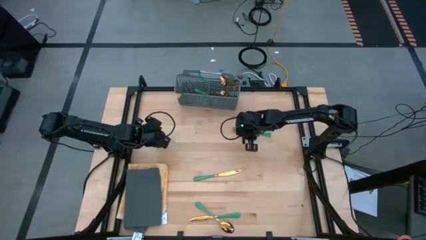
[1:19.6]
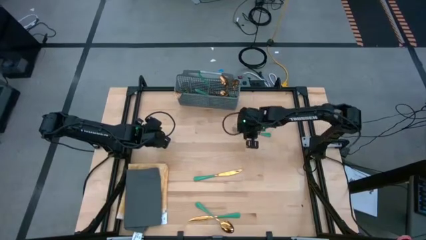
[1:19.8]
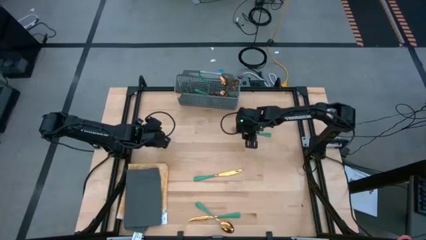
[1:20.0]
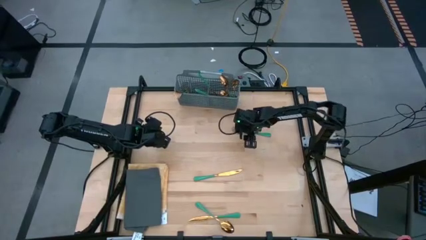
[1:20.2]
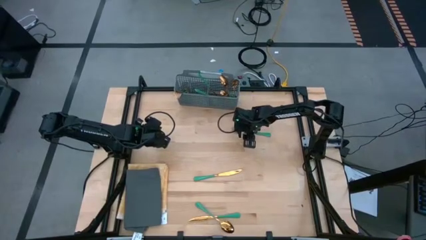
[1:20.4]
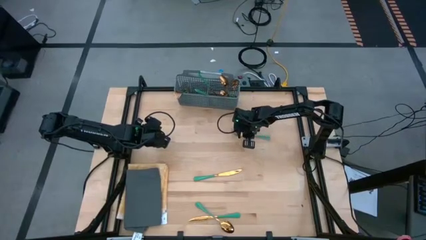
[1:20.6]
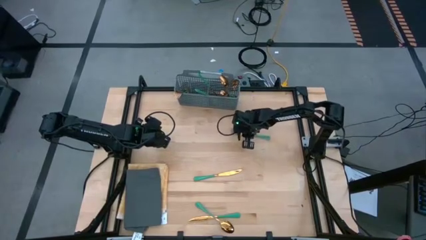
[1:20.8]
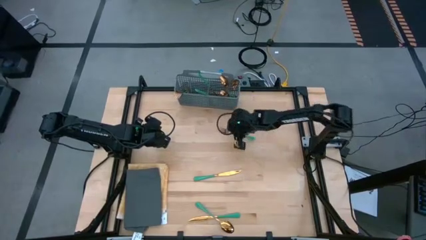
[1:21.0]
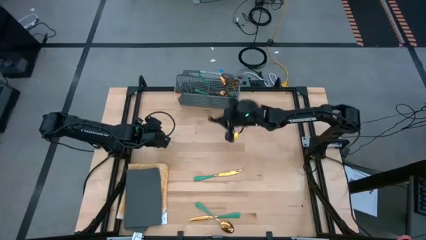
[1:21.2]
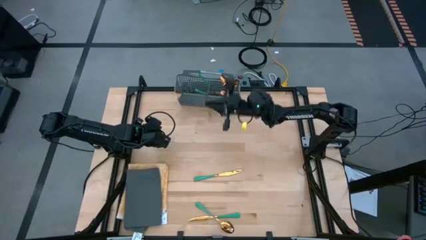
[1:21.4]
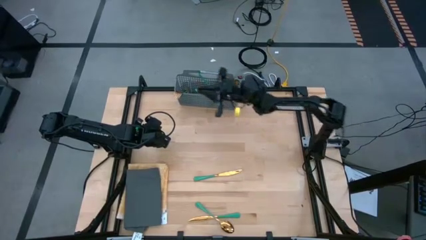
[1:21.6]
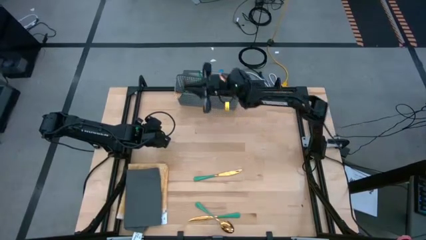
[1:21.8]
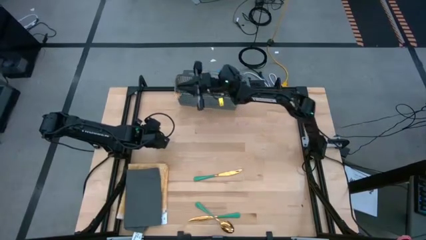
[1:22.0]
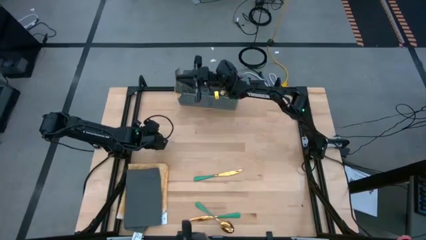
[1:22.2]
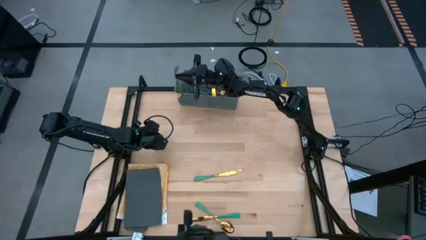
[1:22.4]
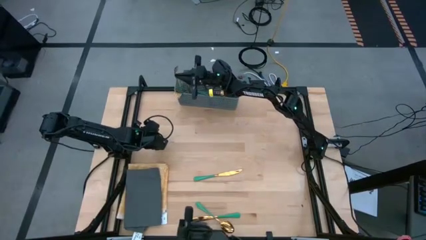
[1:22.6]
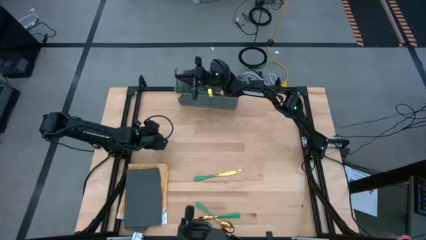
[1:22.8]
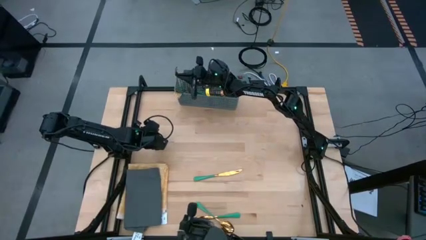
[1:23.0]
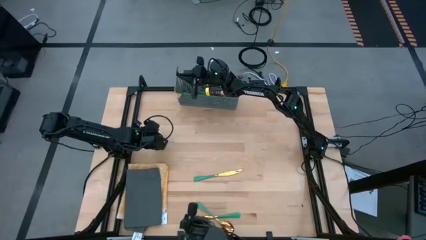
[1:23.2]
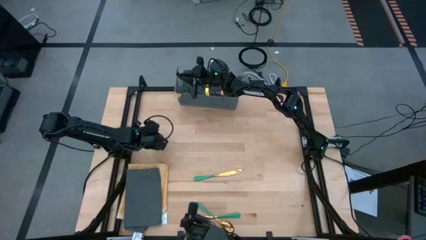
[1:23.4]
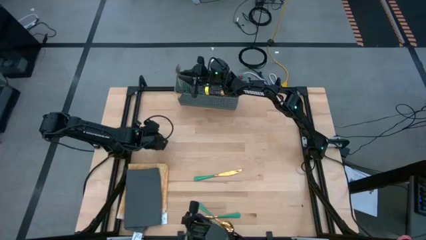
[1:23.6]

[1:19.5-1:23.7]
Task: Sort silverware
Put the green fork into the gray silverware basket

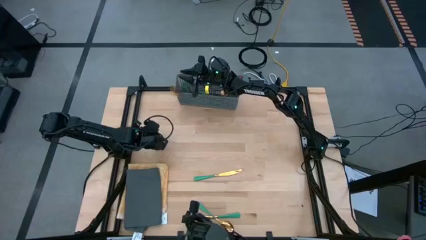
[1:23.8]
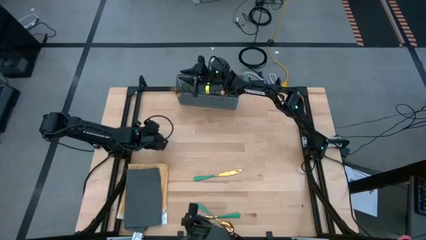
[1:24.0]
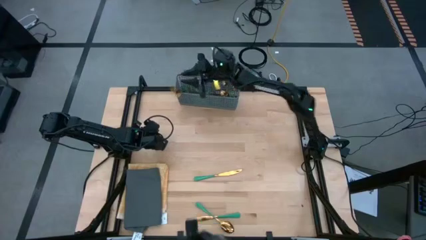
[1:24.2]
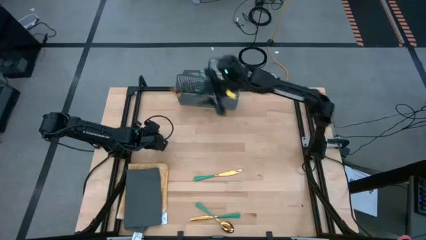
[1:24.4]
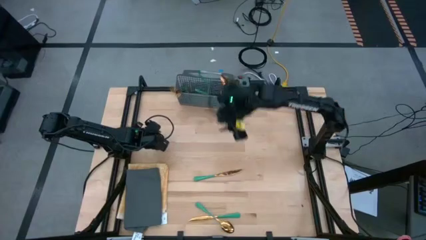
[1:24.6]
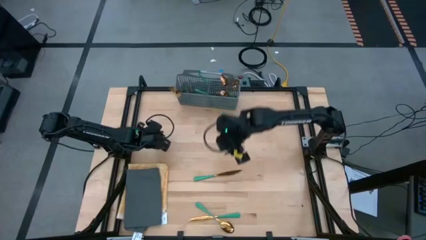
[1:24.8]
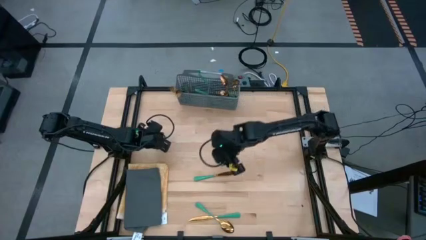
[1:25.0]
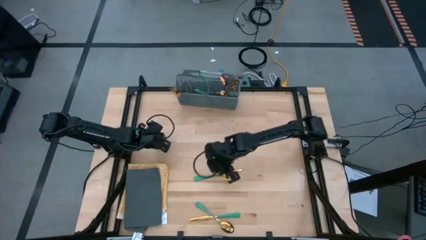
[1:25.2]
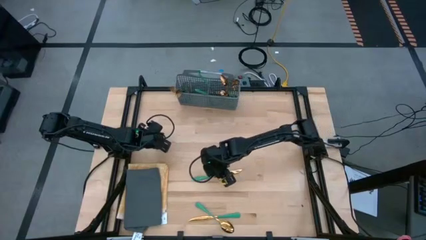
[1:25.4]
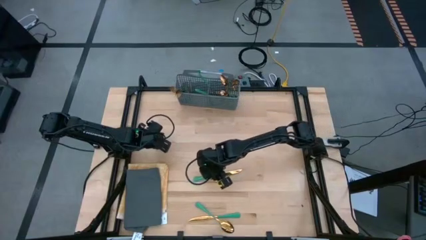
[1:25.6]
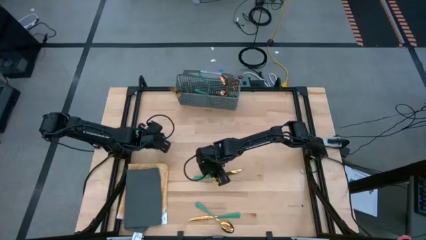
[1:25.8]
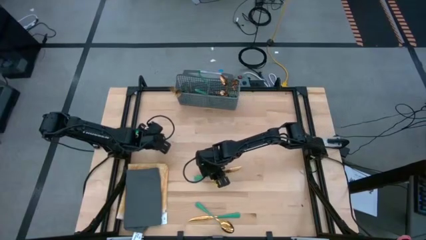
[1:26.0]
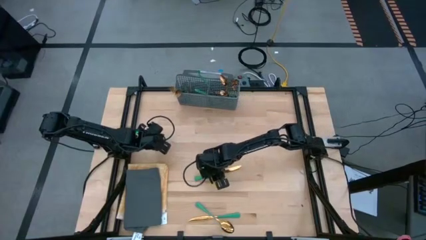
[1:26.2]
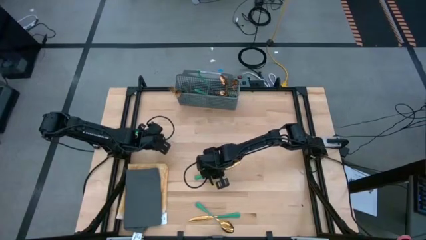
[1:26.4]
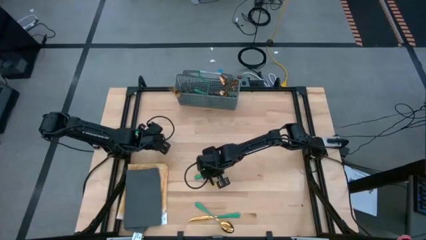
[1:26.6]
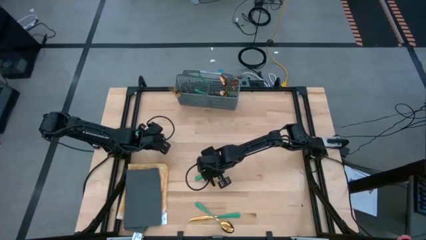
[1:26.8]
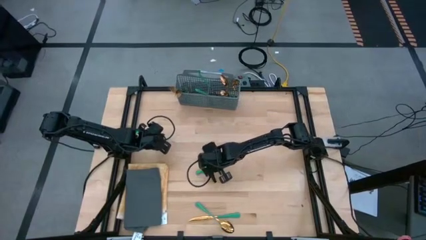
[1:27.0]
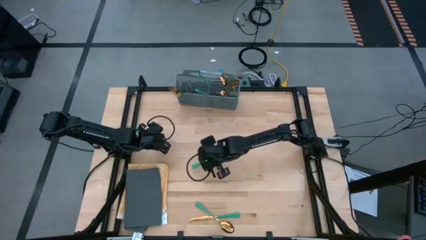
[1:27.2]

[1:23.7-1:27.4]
Put the green table knife into the gray silverware basket

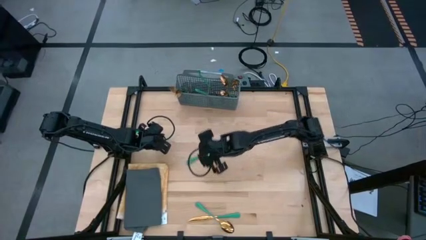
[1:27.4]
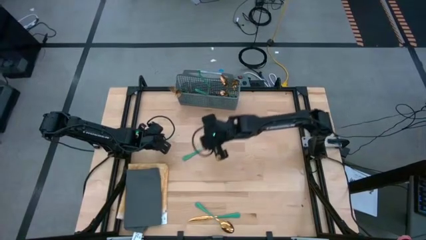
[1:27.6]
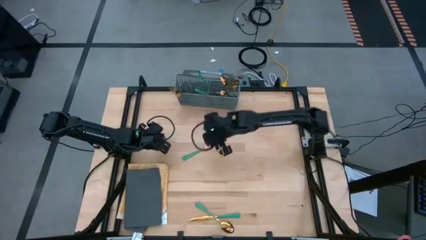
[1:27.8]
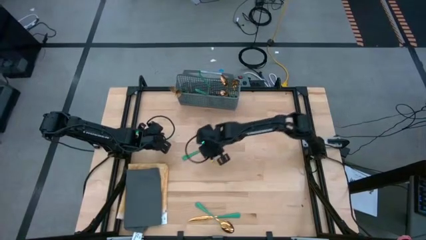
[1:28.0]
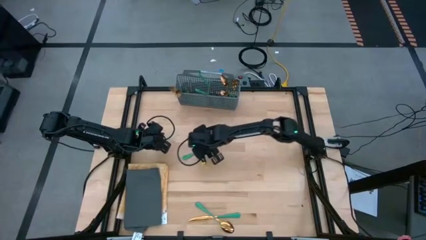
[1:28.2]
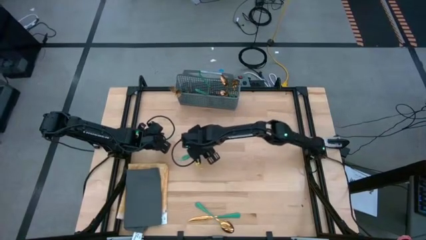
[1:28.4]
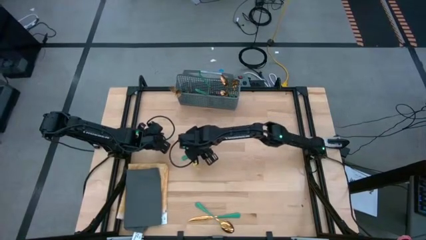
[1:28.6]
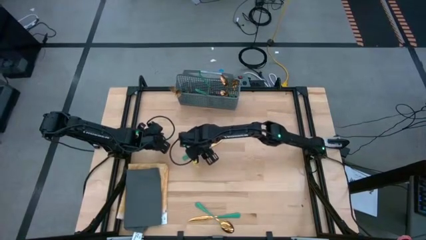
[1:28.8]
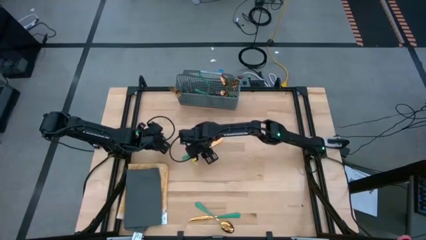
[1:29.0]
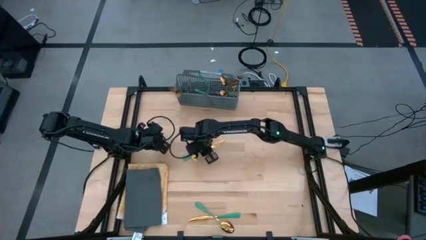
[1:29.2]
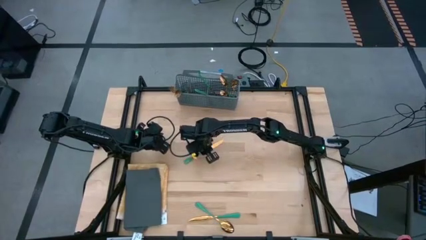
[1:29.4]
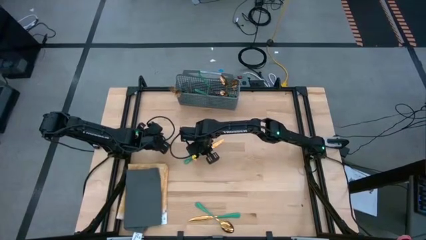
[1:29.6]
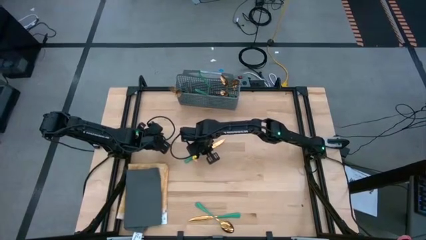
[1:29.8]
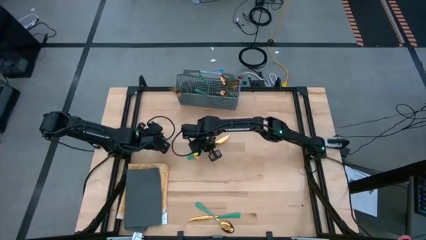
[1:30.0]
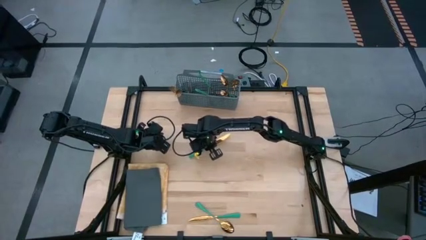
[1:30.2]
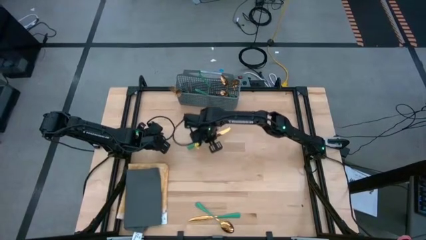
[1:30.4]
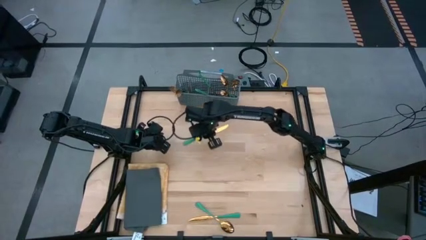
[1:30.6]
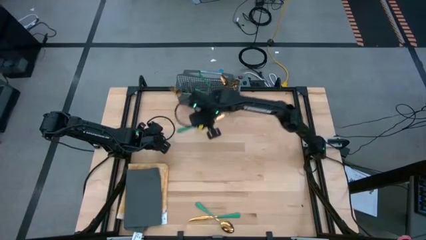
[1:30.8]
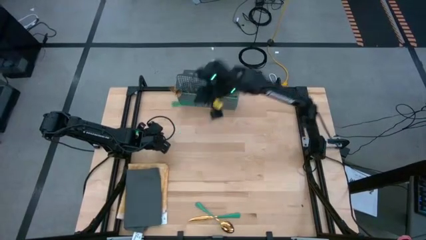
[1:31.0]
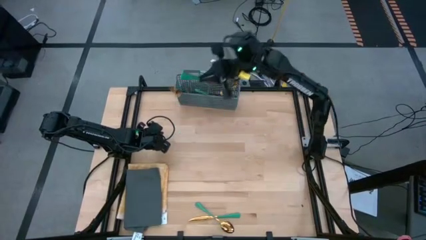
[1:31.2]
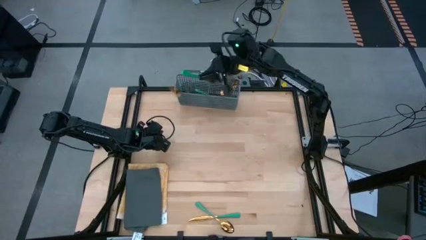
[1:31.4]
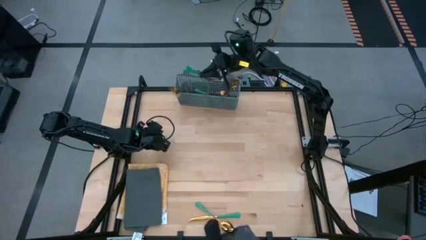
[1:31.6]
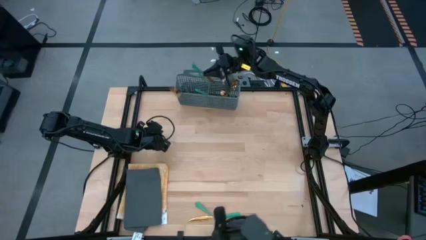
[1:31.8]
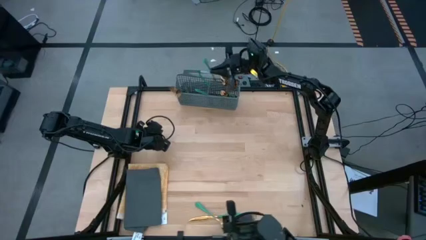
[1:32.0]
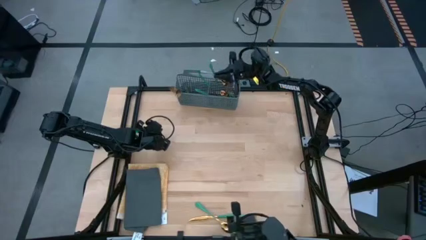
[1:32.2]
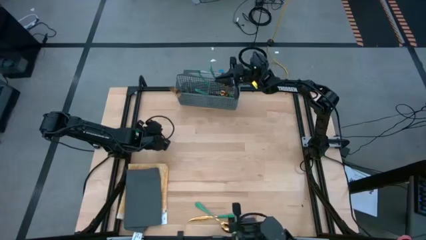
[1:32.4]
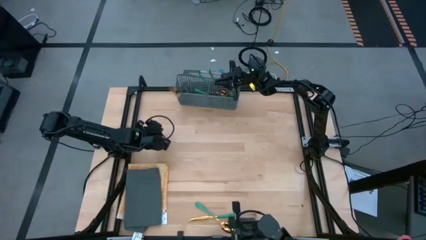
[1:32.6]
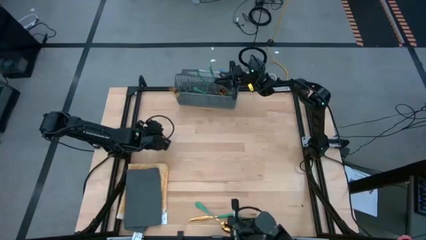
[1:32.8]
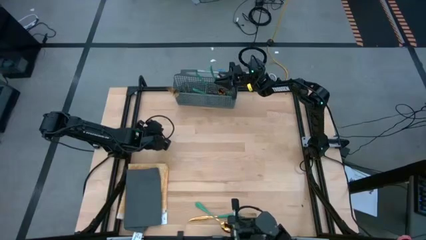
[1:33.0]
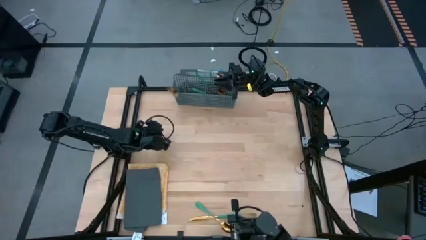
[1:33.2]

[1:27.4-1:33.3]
Put the green table knife into the gray silverware basket

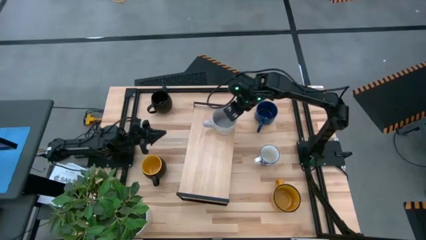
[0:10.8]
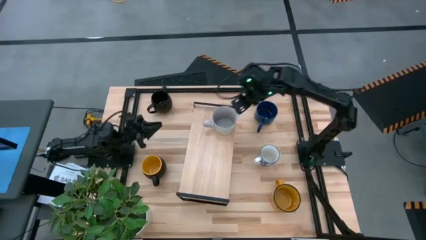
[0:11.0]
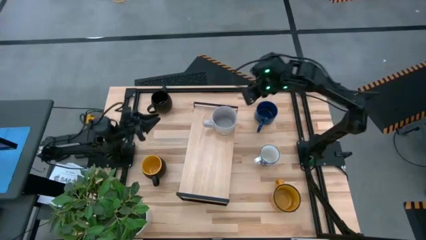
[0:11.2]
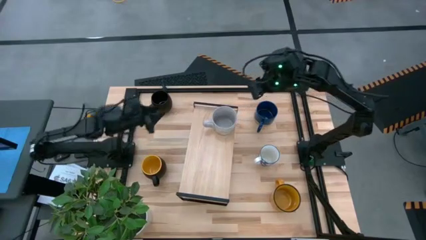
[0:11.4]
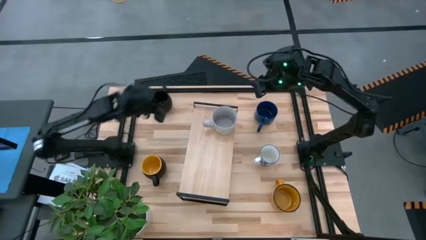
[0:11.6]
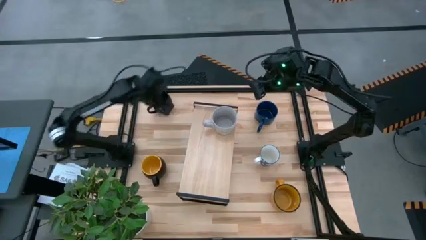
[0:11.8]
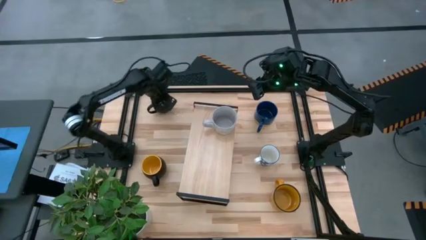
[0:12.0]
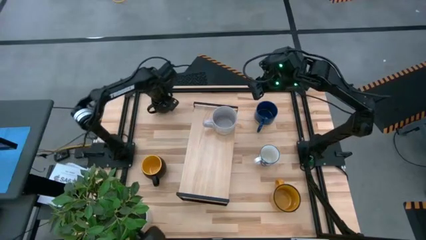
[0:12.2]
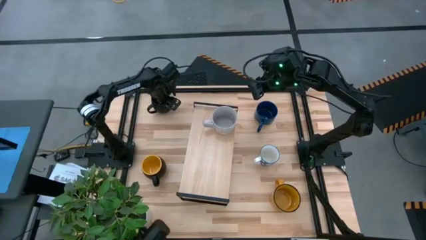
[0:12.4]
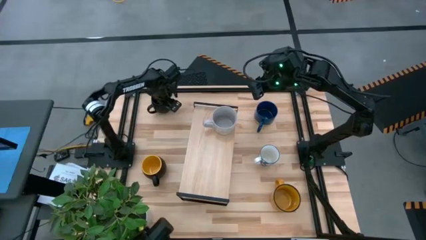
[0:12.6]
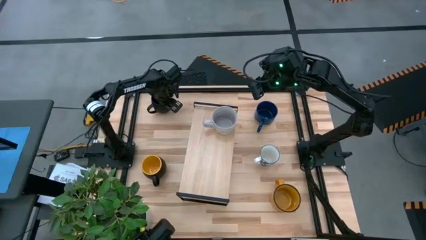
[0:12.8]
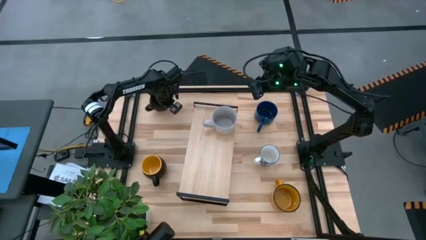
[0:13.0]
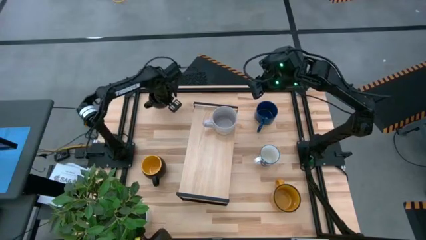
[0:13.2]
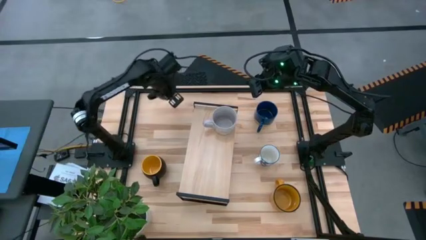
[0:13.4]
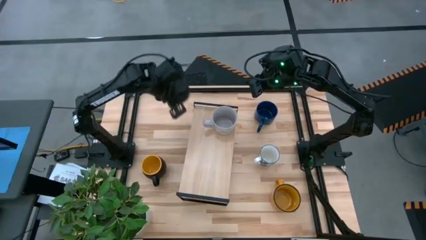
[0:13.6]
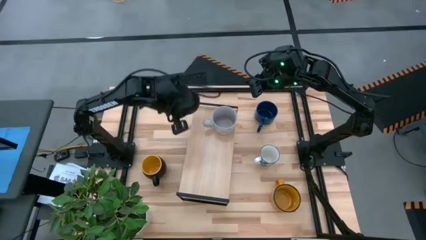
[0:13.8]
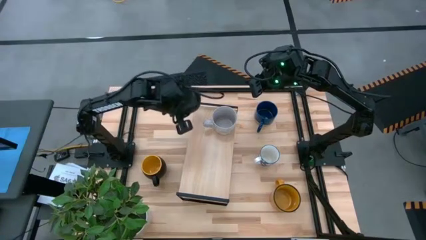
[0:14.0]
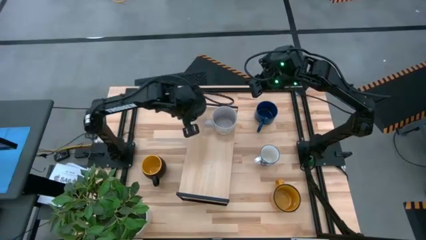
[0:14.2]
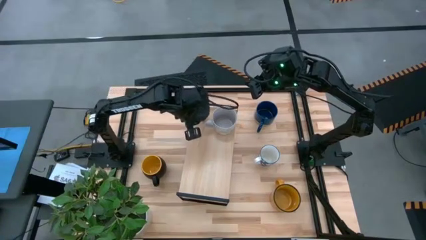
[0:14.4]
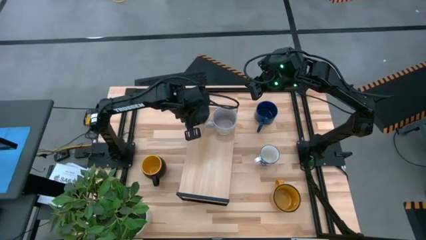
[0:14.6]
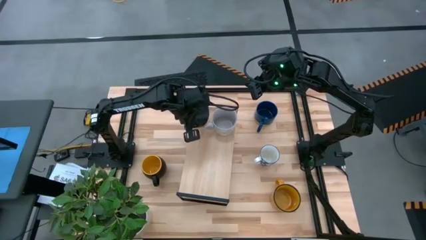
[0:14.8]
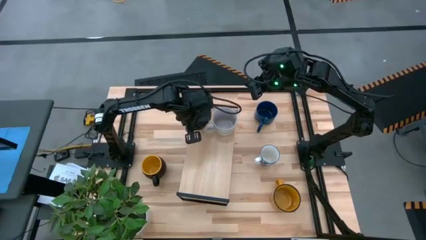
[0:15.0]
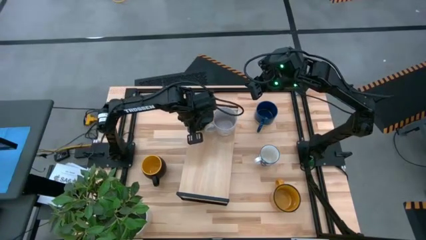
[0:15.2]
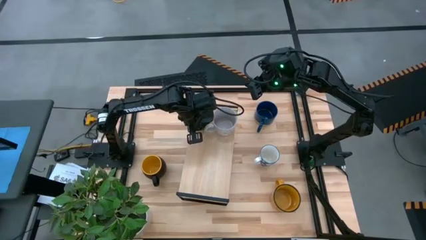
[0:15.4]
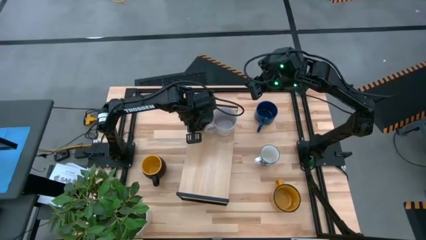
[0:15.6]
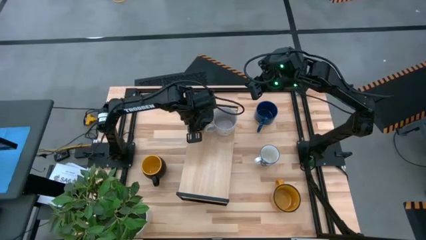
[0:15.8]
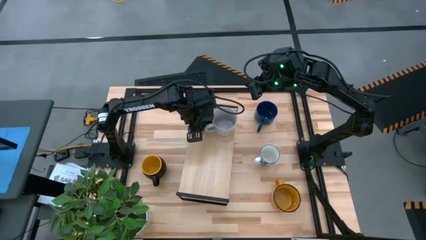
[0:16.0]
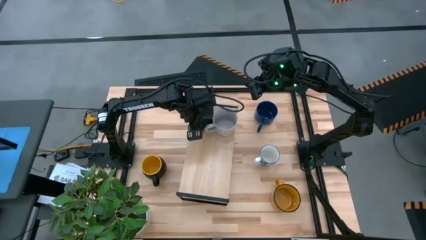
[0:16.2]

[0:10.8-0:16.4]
Task: Place coffee mugs
Put the black mug on the shelf
